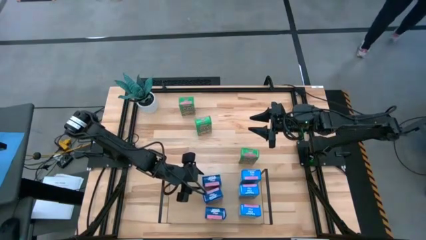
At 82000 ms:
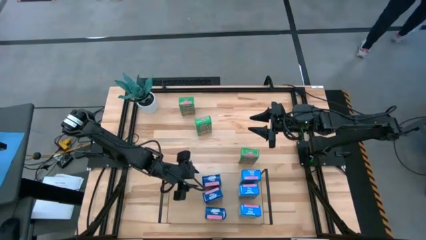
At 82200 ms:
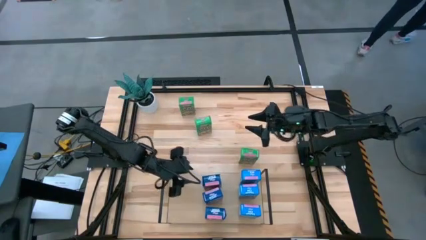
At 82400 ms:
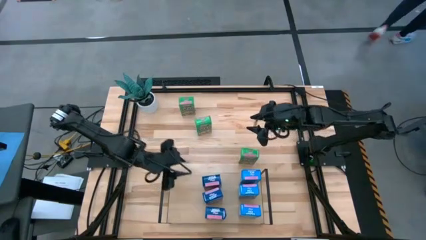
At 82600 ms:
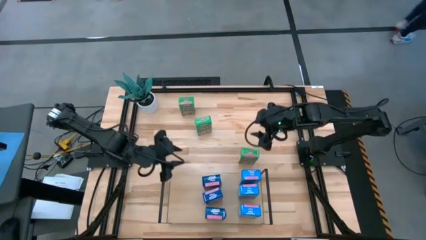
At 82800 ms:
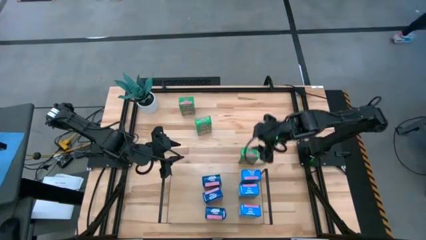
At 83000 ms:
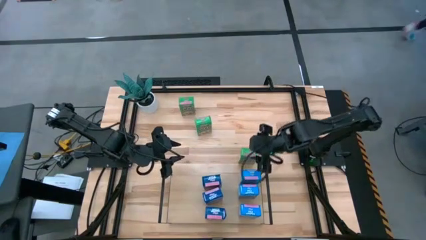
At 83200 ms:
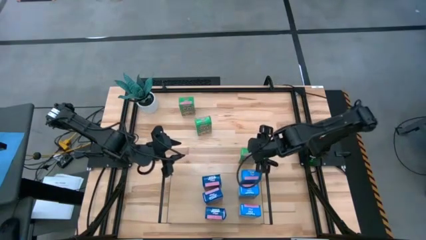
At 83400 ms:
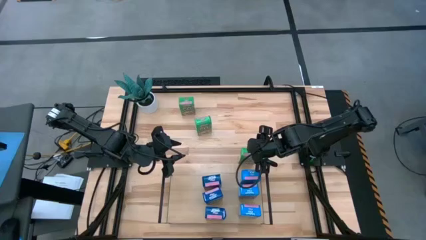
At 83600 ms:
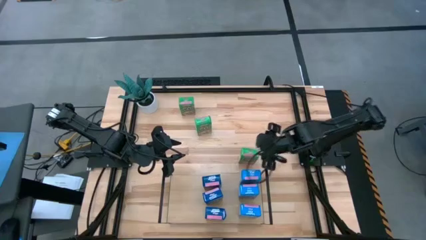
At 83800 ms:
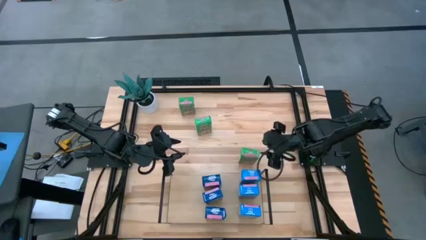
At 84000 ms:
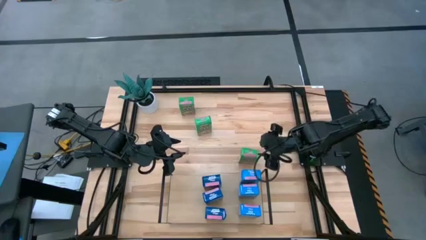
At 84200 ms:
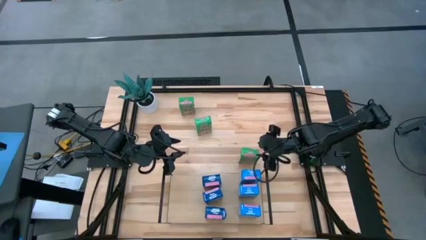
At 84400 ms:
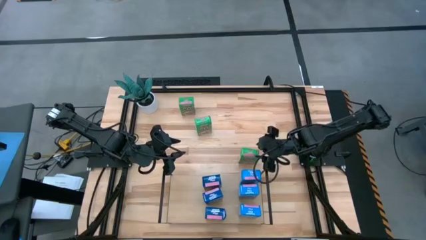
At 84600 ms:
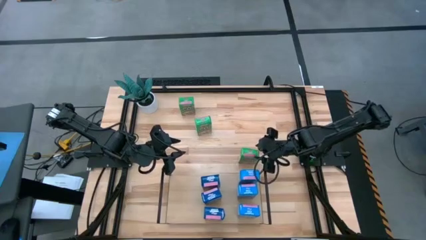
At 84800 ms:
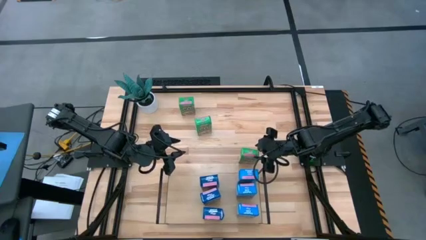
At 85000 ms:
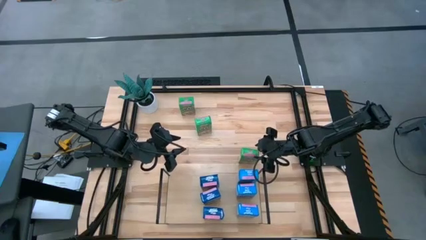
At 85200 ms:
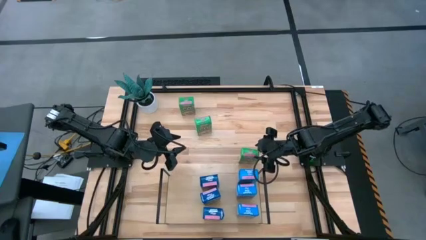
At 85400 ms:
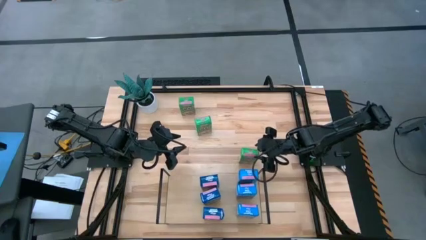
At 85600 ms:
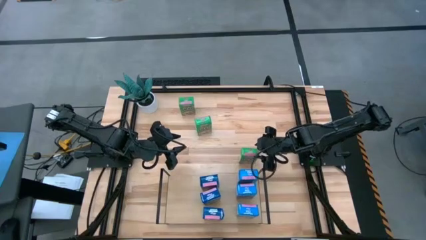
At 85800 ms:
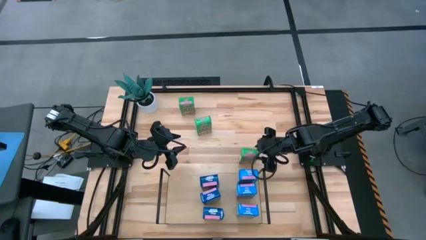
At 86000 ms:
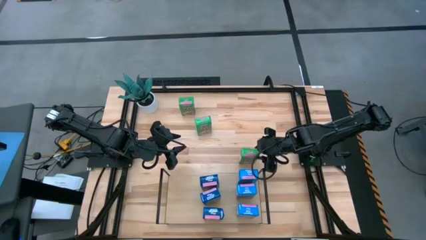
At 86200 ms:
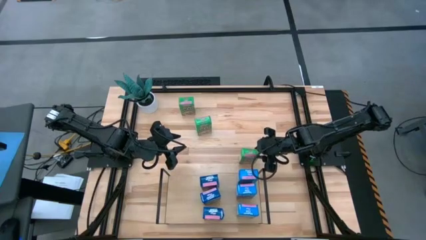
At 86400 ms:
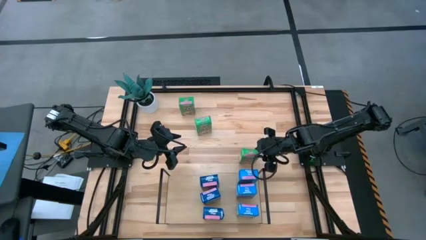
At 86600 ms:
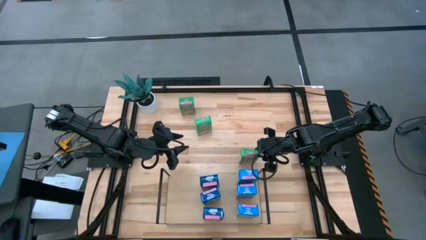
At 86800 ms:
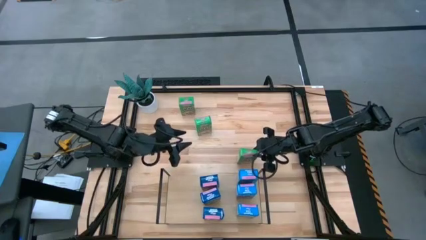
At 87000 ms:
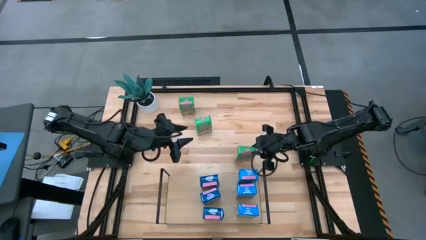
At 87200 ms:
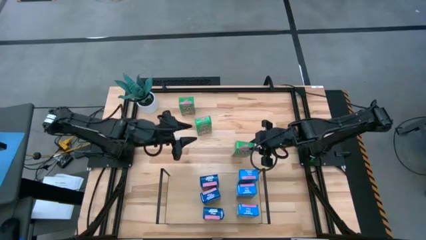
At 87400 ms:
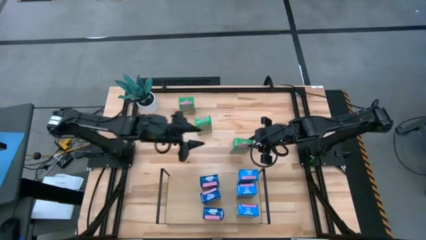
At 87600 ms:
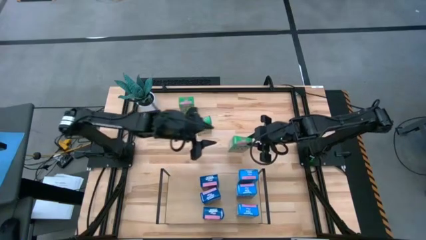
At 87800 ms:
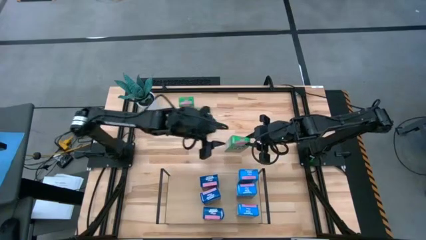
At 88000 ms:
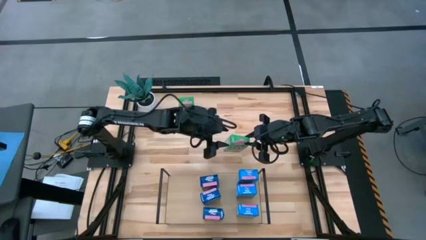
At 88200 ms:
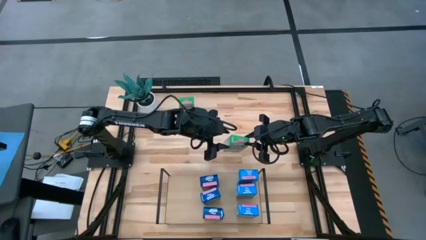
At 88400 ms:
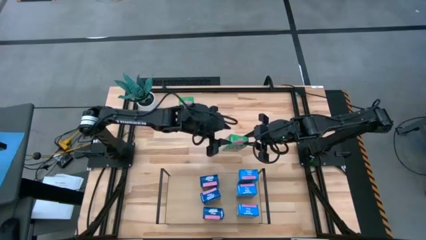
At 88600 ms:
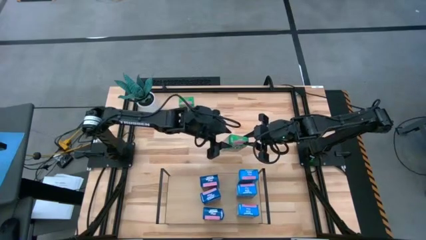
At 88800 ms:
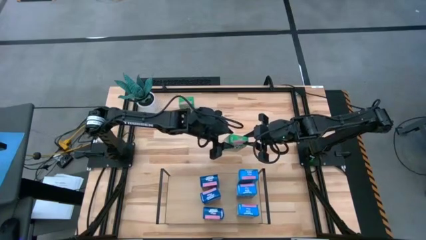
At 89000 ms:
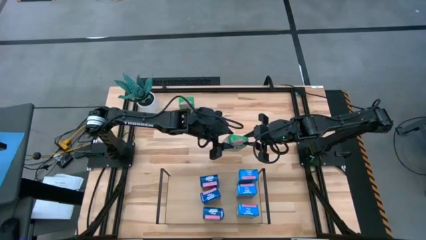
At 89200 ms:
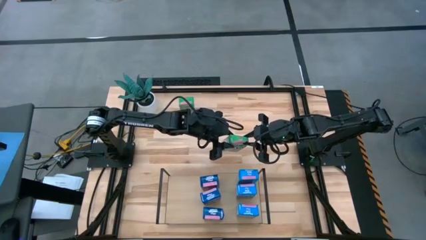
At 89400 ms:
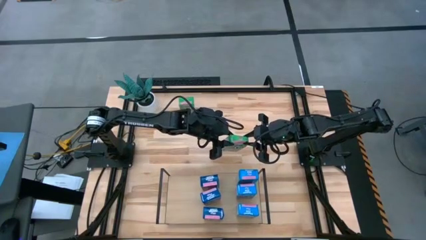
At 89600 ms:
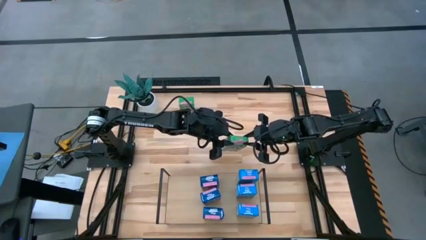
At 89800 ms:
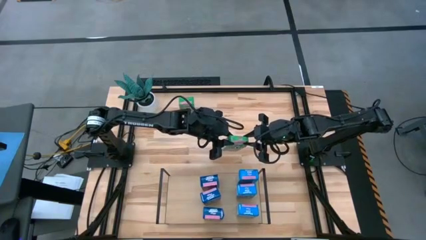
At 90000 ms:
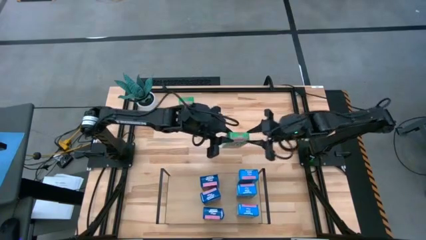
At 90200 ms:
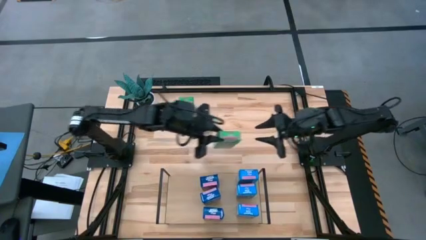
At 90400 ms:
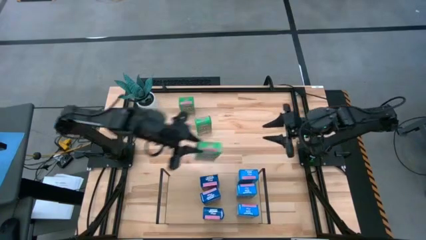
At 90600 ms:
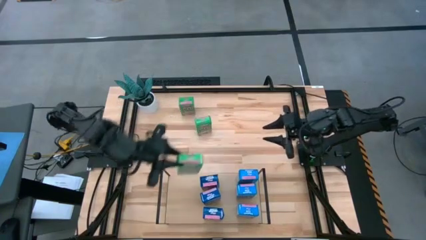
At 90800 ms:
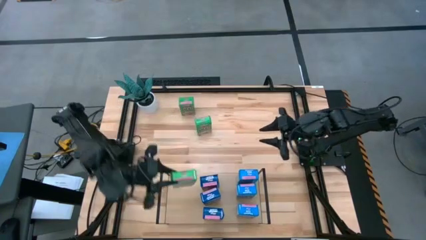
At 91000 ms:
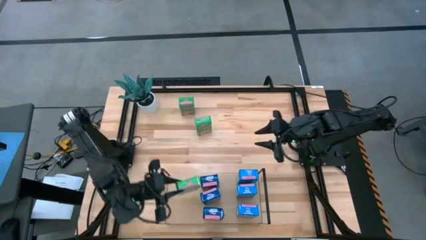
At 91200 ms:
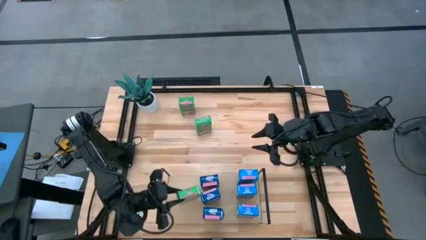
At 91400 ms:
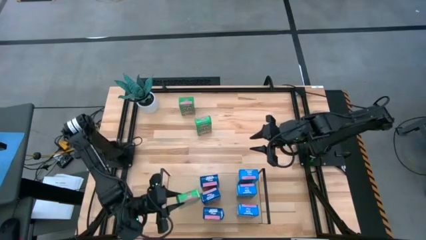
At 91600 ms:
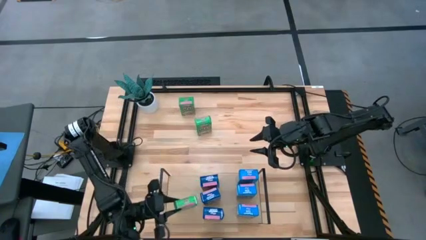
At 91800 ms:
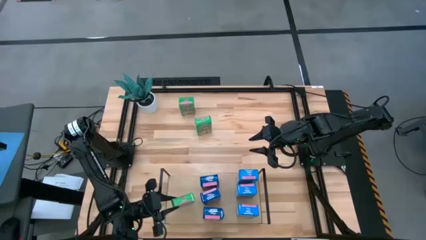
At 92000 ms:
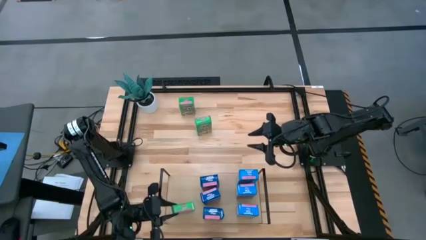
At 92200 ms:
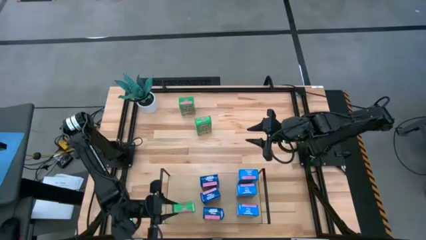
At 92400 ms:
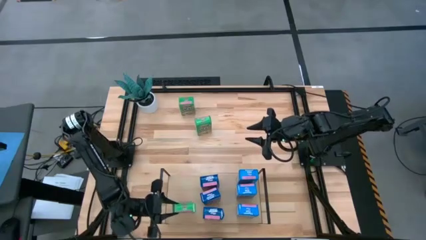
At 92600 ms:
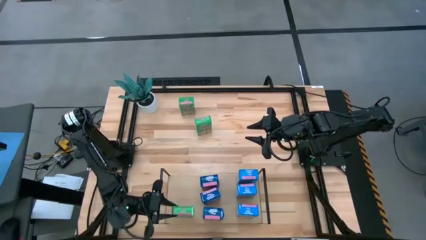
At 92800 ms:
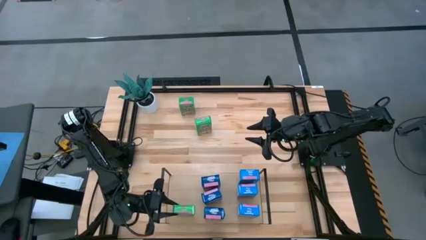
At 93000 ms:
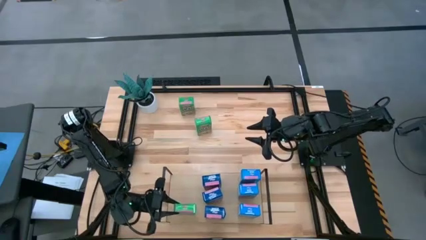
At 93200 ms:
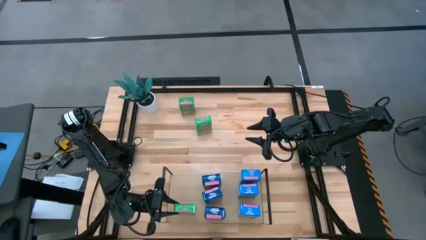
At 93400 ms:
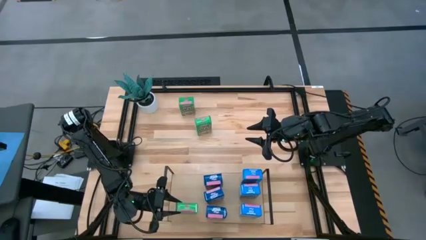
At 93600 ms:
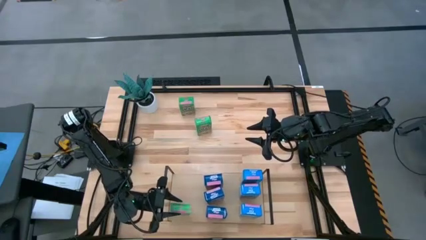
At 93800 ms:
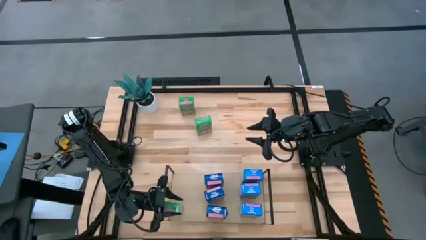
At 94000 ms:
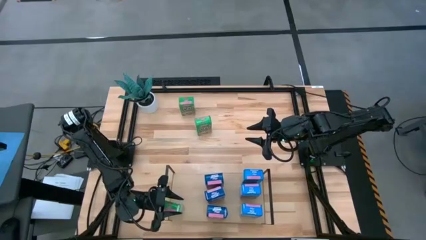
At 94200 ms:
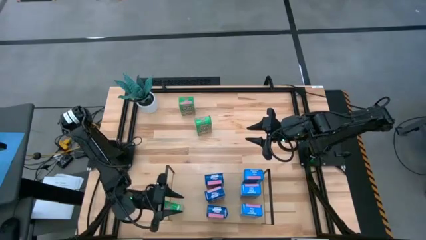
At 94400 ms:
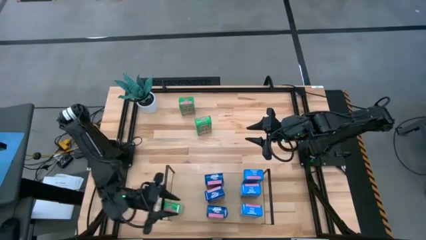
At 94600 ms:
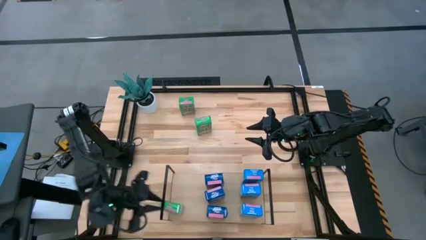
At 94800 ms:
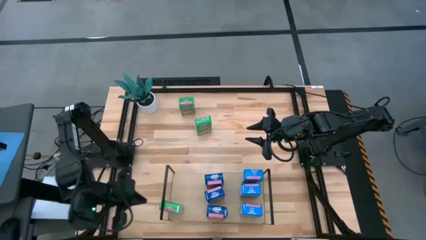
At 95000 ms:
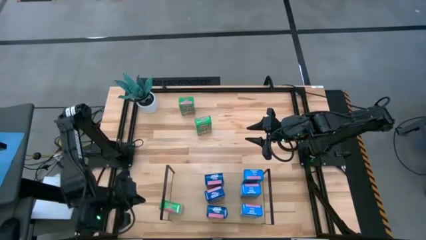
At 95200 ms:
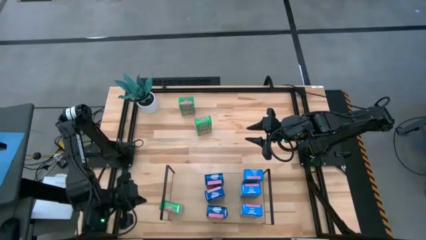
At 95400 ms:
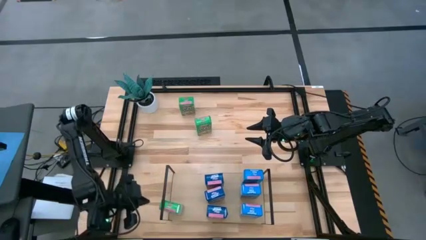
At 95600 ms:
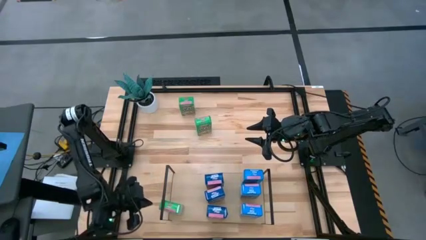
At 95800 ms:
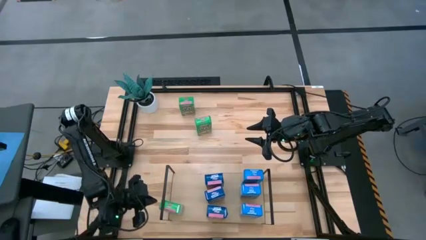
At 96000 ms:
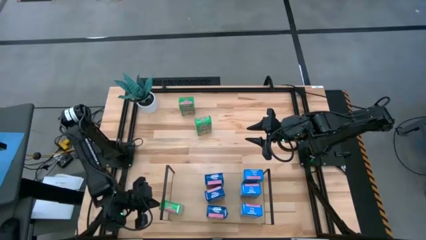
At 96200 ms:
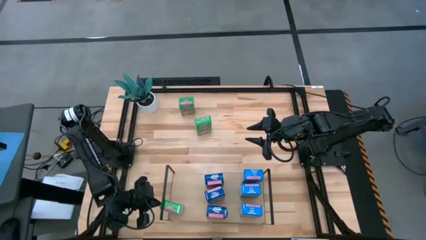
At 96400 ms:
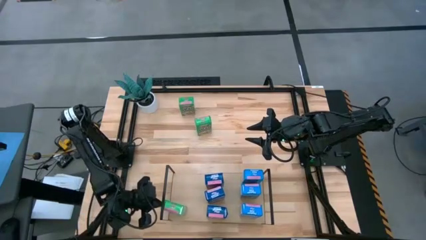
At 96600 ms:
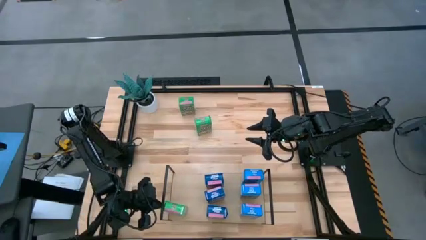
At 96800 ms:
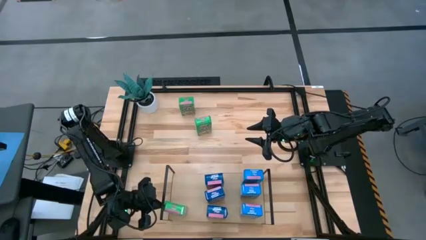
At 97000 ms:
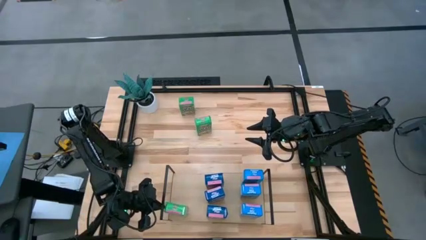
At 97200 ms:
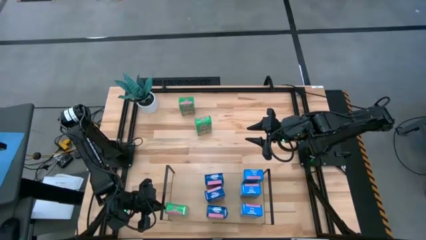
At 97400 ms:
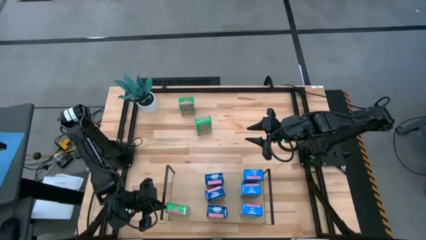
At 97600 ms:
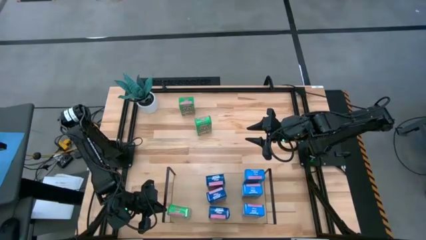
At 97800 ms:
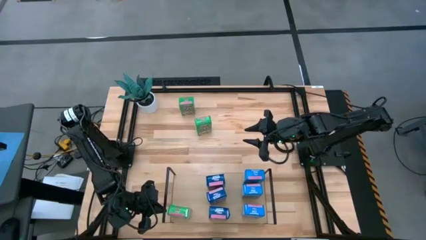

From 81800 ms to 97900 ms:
Task: Stack cereal on shelf
Put the bottom green cereal box on the shelf
